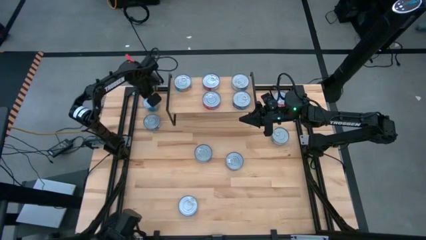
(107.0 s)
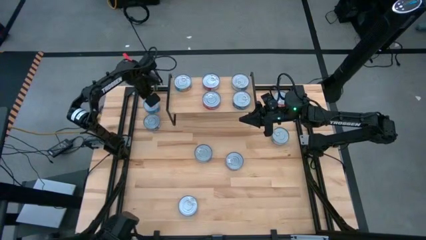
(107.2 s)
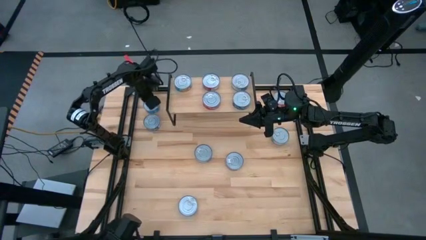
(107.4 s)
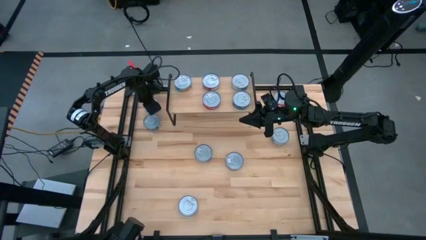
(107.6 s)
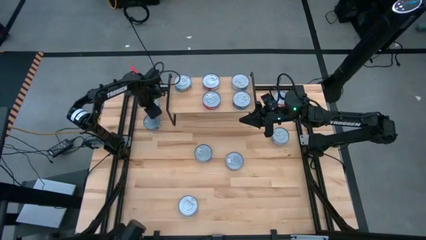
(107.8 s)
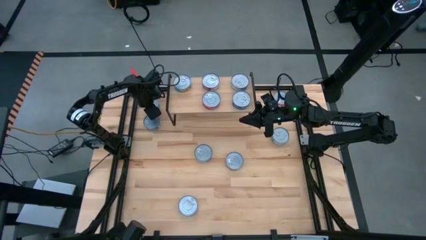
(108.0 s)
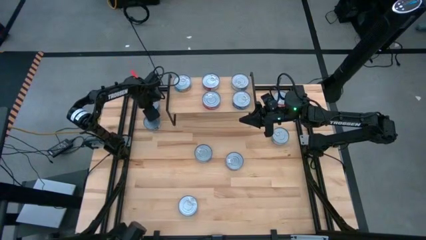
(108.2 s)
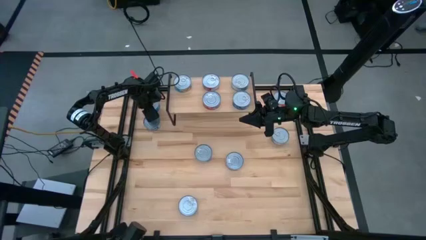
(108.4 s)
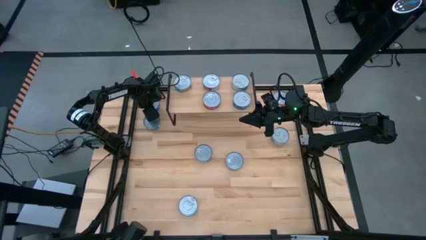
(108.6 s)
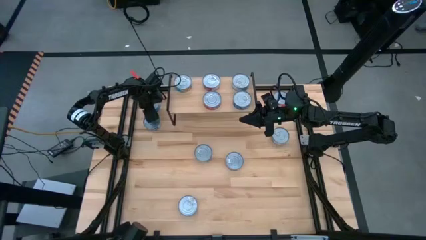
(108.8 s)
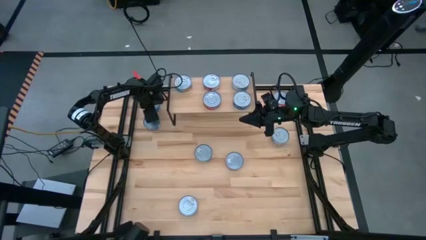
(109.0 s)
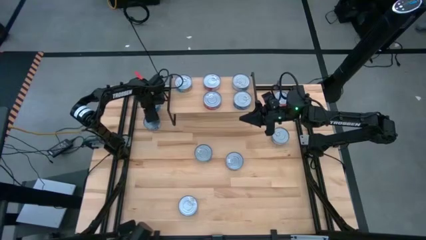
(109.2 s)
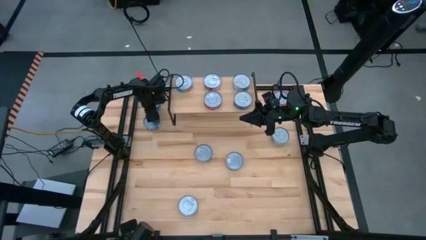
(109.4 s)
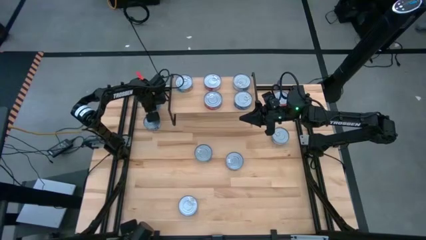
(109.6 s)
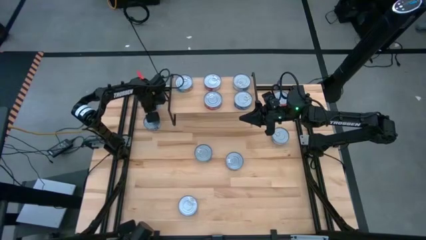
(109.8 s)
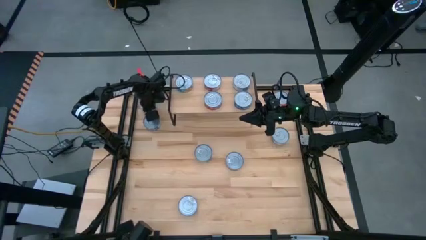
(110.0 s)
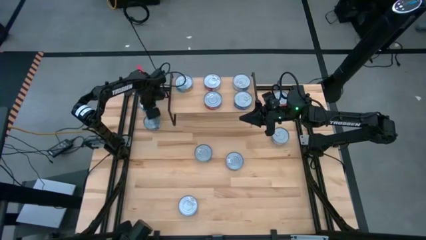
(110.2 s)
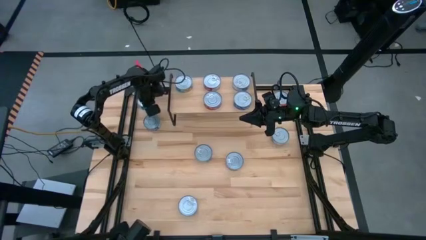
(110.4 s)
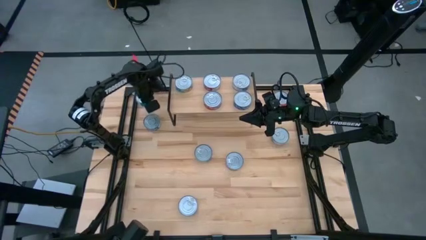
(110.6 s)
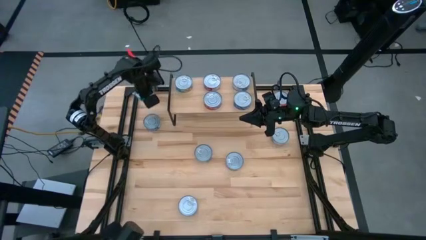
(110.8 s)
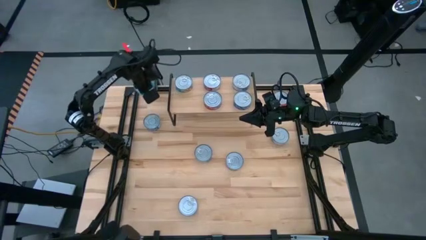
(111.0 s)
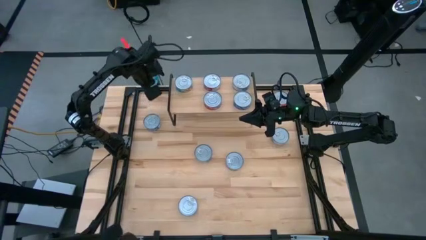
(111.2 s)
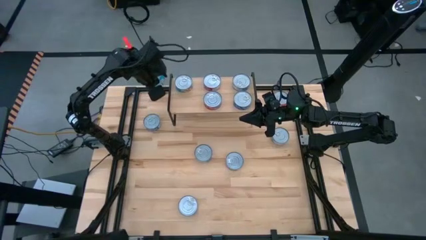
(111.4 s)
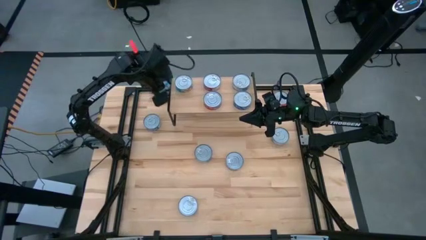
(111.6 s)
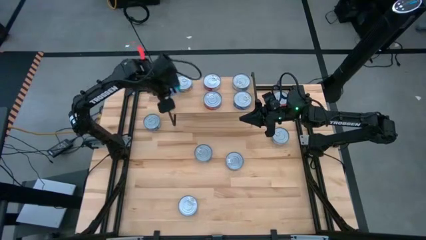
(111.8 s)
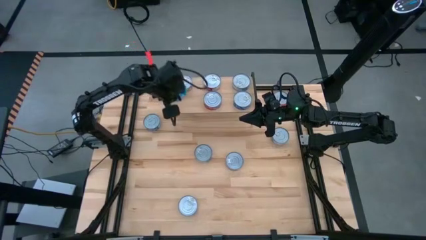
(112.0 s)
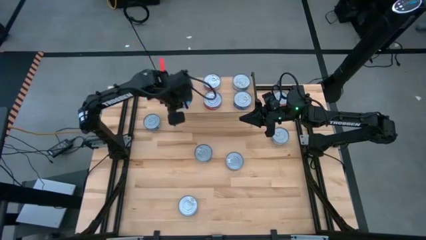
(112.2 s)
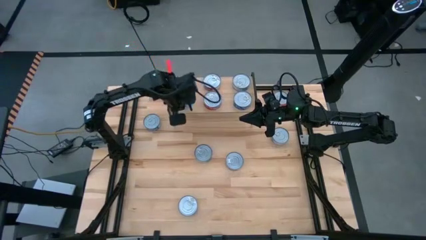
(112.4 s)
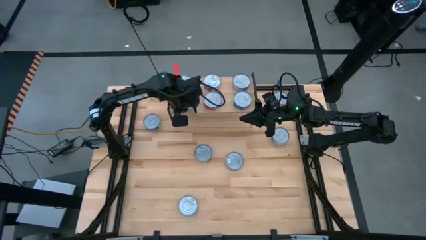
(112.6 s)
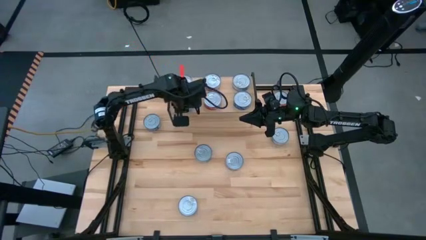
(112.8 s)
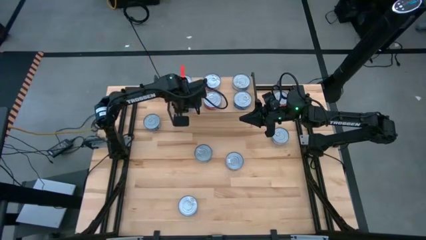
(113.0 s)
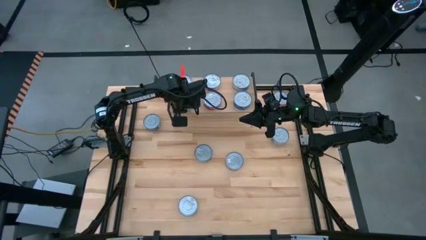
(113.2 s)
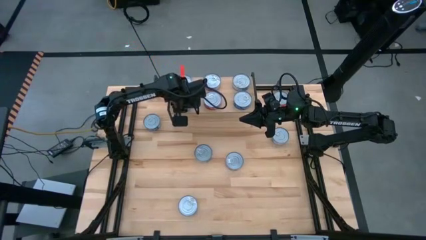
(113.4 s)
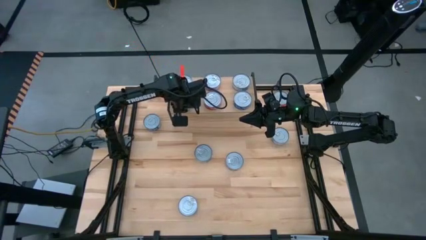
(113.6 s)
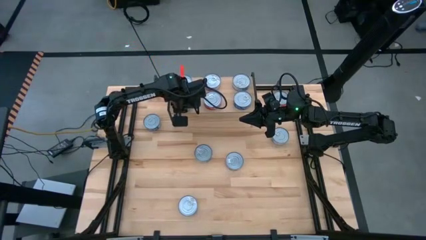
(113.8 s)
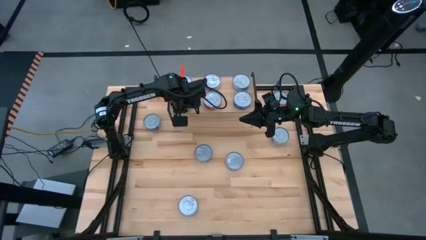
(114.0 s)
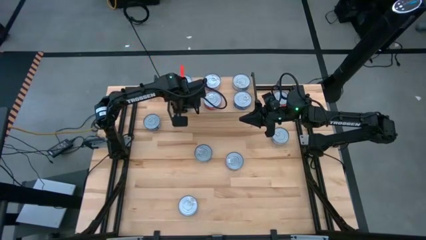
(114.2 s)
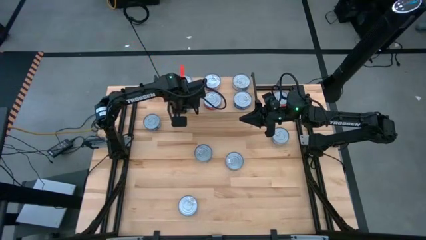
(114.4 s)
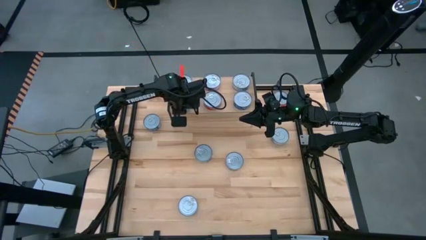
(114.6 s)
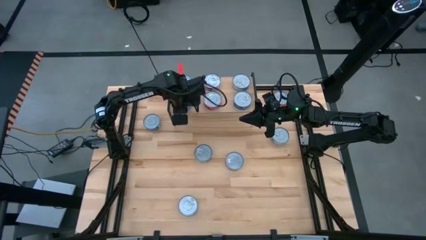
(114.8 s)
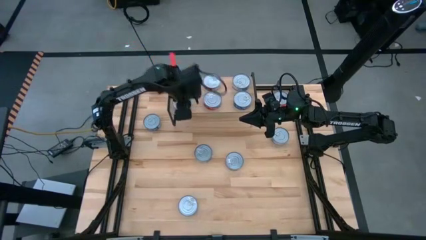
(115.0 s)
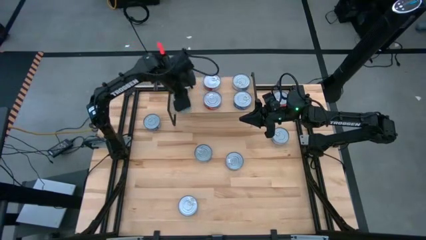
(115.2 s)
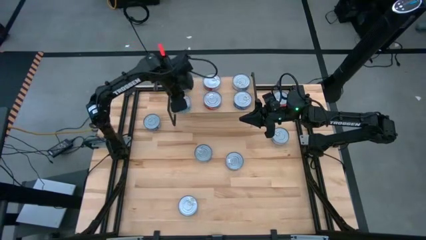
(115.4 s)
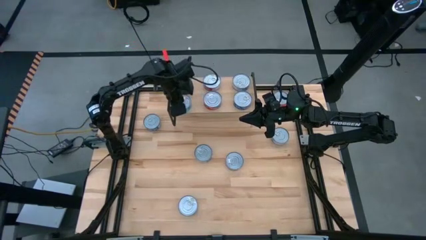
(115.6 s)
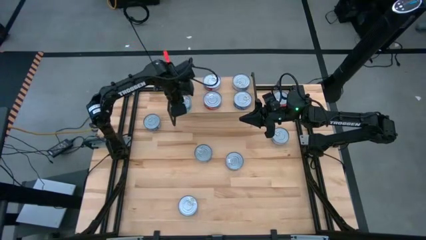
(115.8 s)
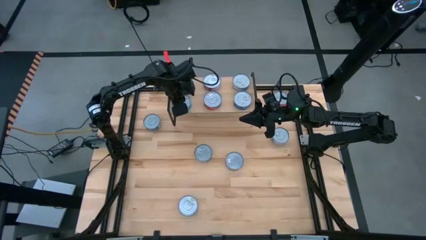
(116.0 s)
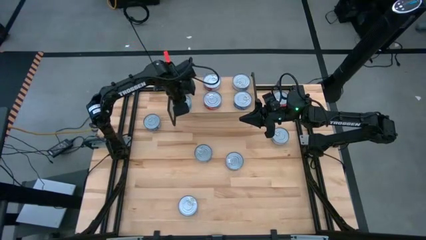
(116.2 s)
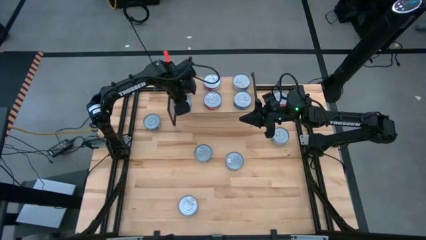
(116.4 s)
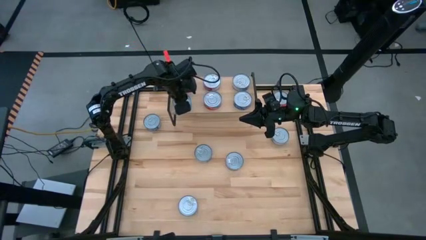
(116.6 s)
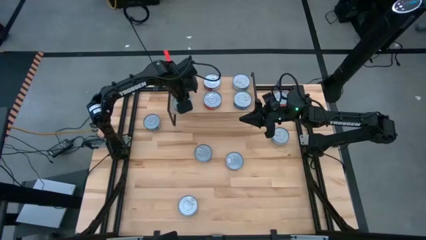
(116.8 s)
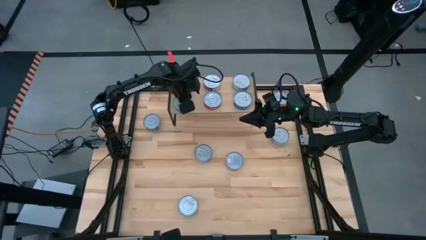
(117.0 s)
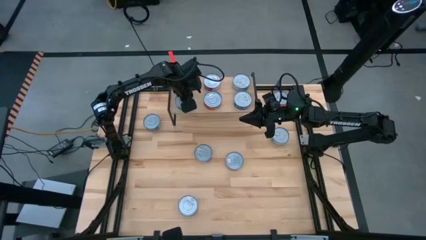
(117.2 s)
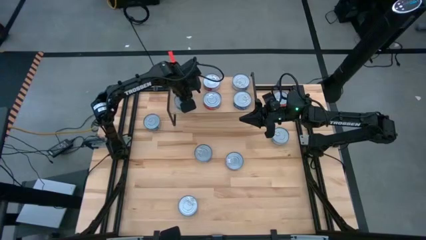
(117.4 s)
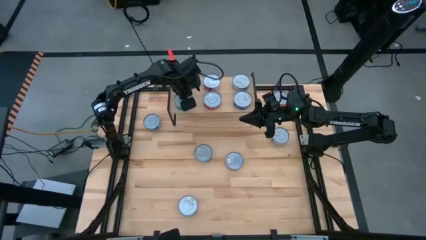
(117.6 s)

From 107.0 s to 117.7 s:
Task: Stack canned seafood by type on shelf
Put the top left yellow and blue tuna can on the shelf aligned with the other yellow and blue tuna can

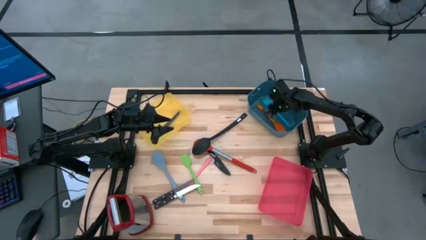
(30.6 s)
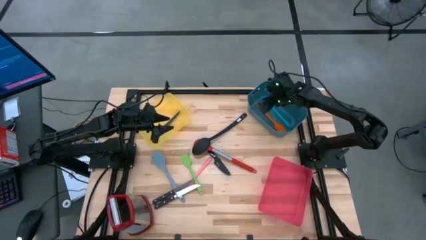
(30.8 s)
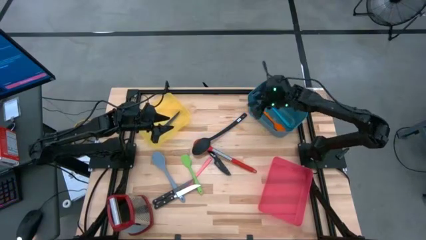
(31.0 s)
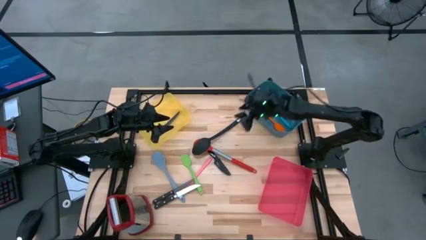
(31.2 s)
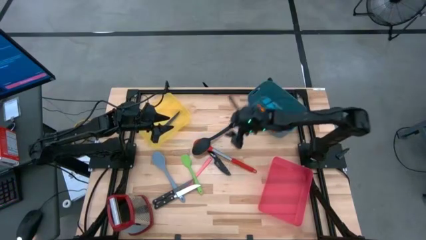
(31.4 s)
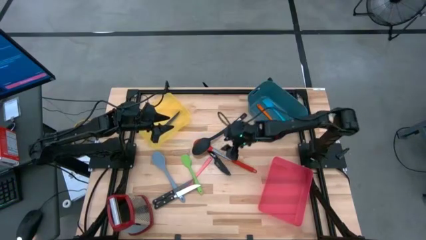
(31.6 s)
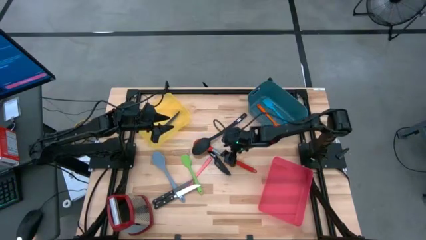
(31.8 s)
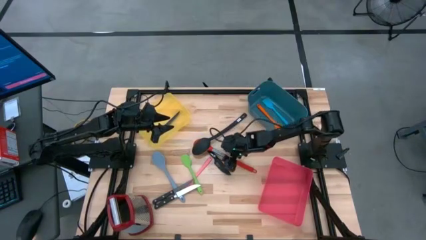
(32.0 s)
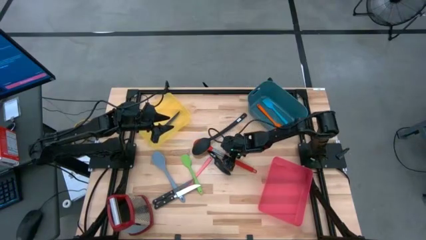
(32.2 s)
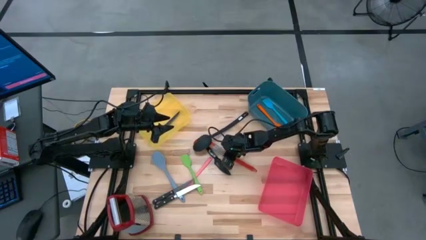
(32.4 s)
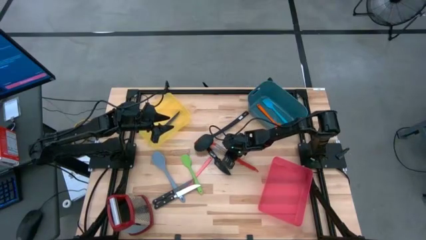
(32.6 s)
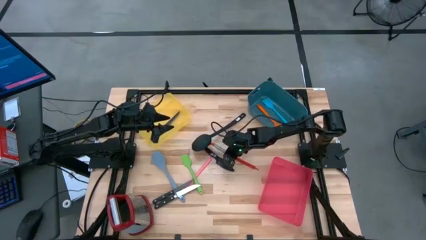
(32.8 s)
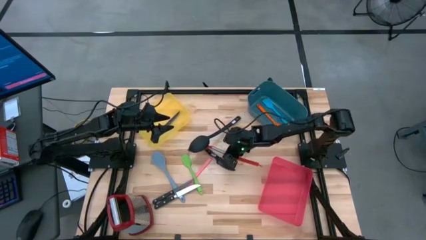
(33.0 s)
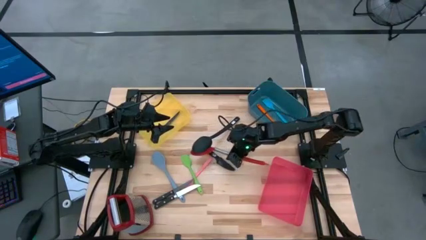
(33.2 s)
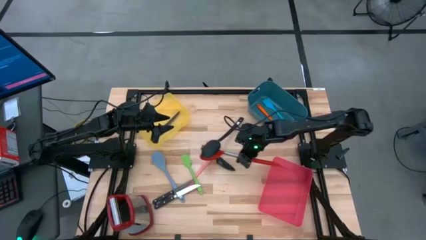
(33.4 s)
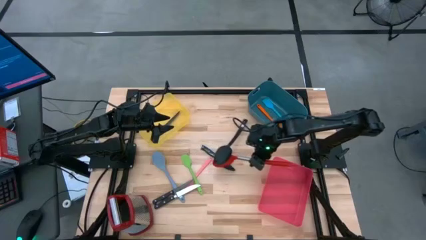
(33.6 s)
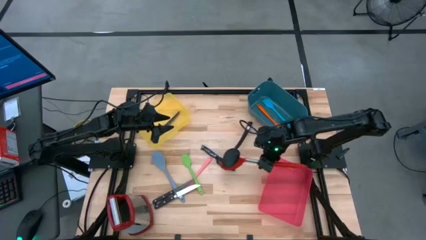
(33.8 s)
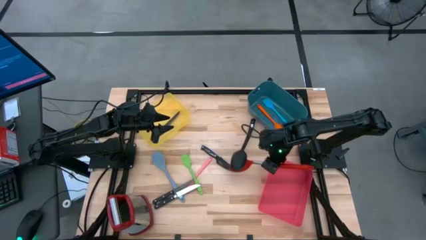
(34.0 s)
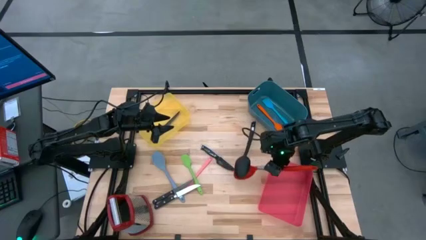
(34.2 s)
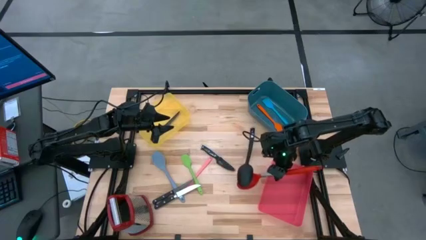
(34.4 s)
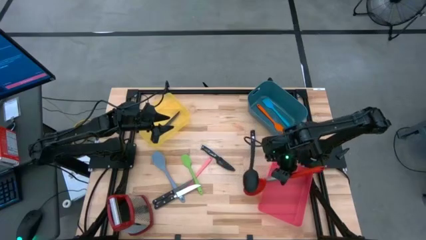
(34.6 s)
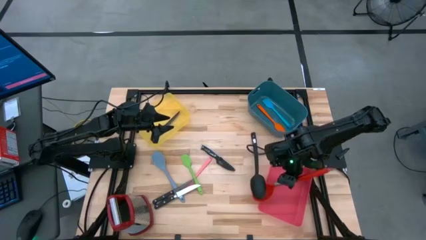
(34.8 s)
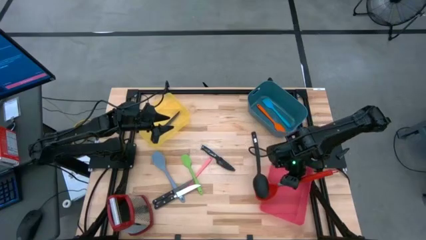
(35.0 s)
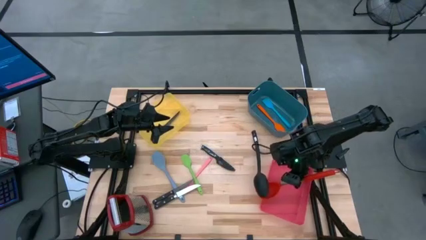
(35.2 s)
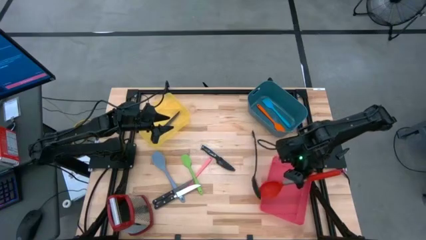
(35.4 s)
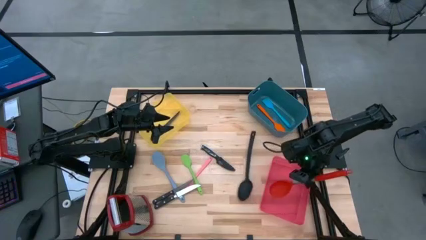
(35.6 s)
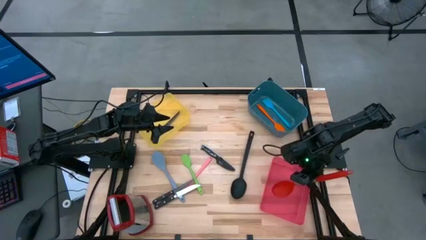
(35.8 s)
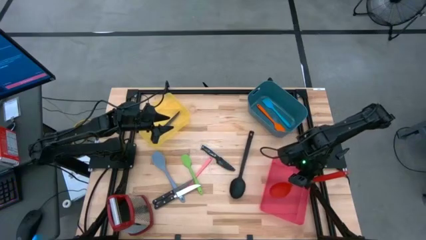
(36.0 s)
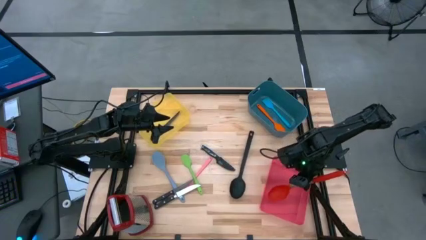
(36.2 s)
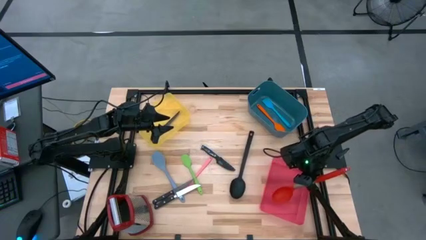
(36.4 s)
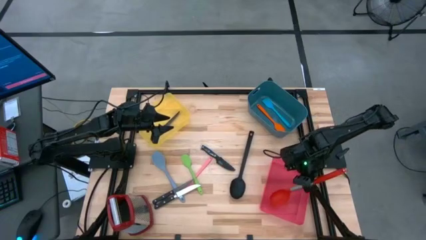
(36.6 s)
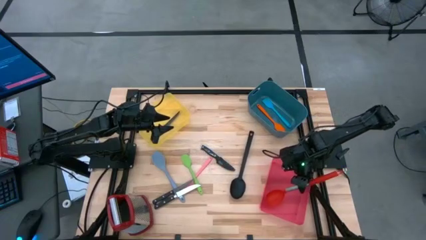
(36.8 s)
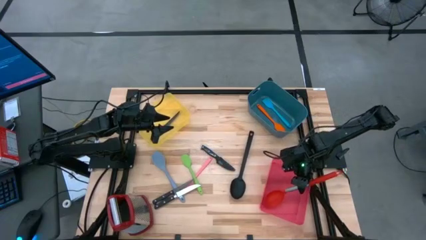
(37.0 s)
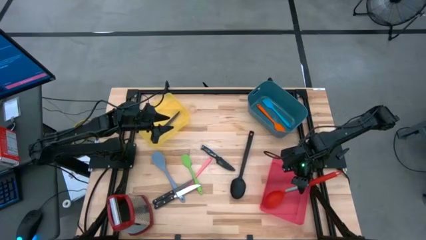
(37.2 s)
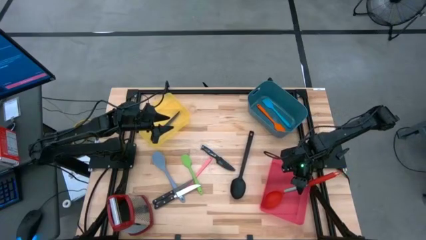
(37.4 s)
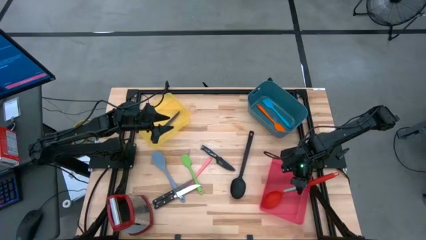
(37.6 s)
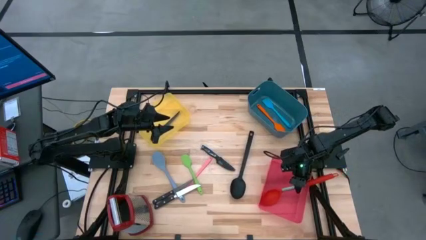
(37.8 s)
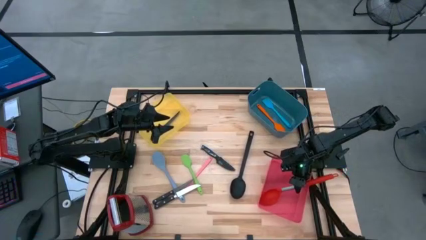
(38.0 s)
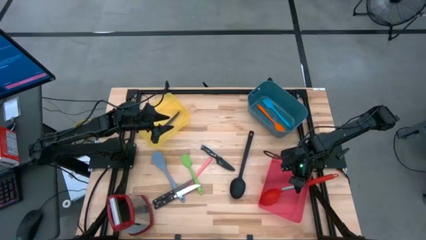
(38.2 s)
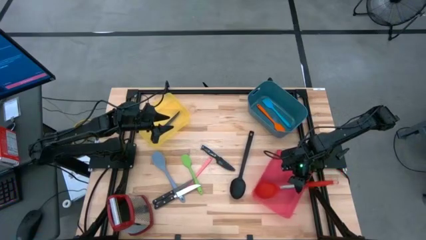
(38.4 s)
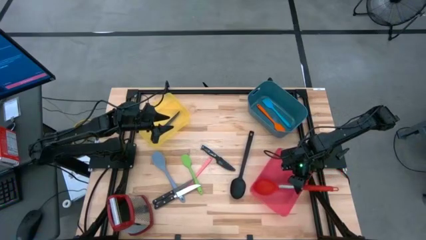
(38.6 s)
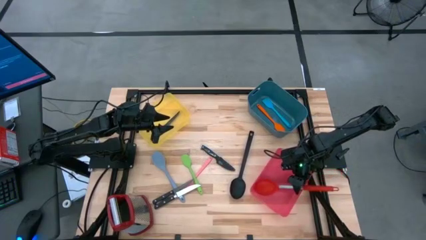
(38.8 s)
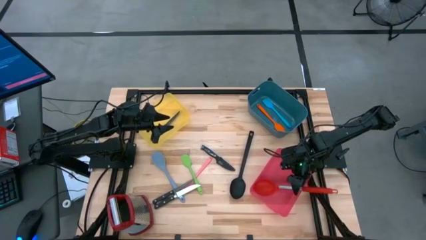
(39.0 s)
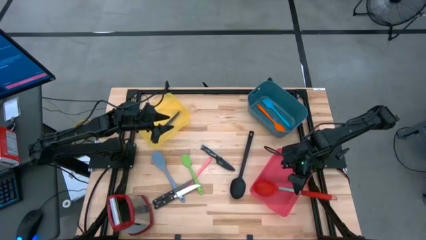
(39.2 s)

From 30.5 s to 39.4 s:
Task: Pick & Place Kitchen Items
Put the red serving spoon into the red bin
